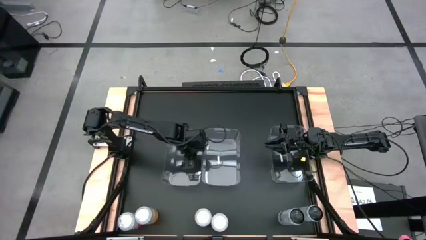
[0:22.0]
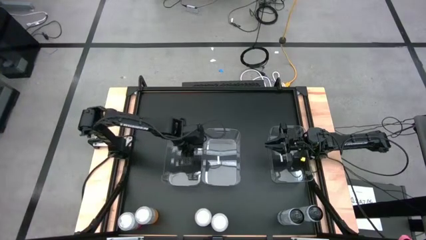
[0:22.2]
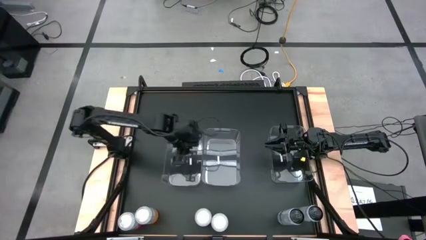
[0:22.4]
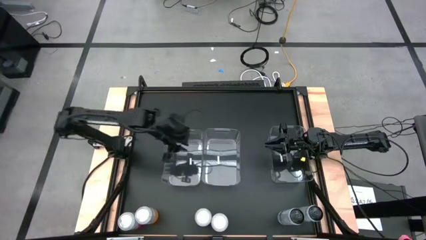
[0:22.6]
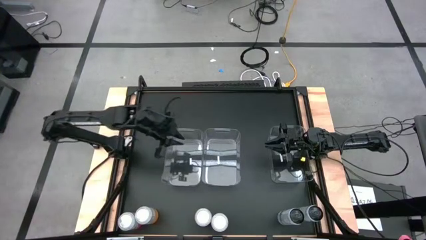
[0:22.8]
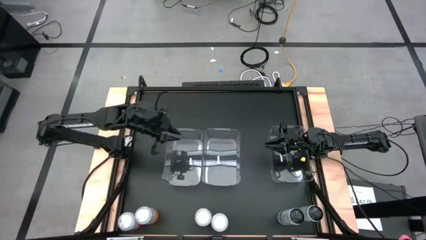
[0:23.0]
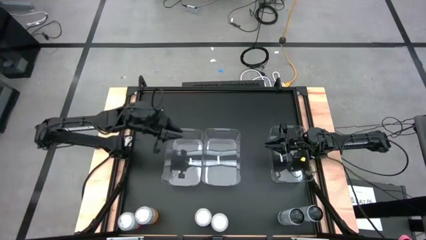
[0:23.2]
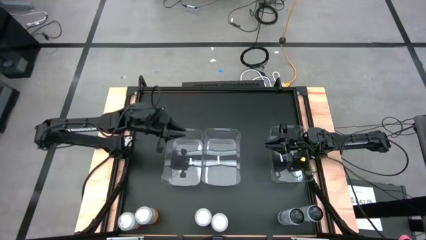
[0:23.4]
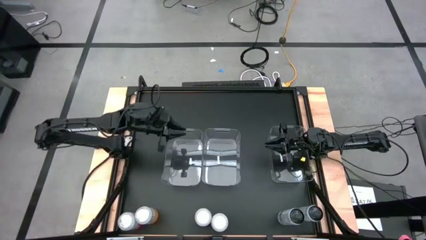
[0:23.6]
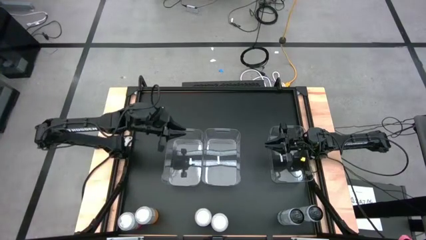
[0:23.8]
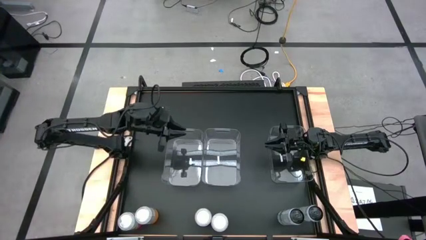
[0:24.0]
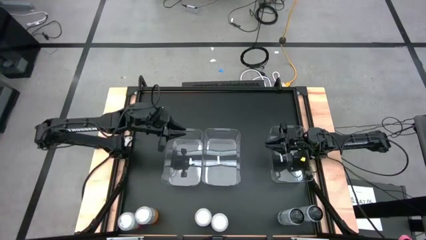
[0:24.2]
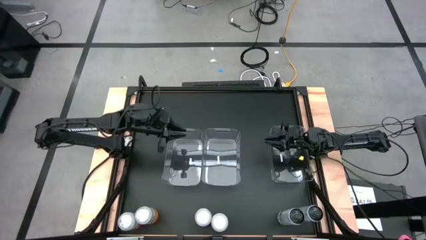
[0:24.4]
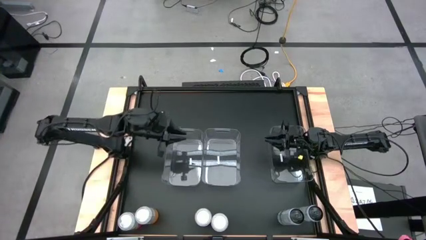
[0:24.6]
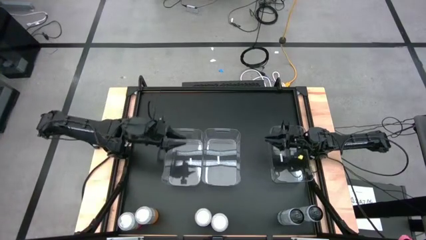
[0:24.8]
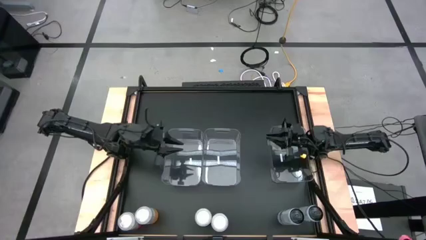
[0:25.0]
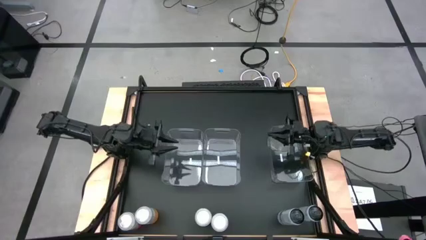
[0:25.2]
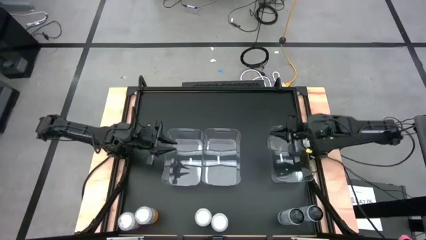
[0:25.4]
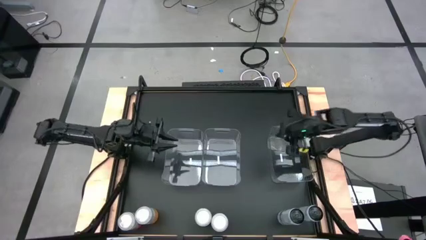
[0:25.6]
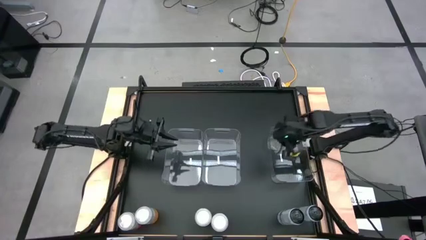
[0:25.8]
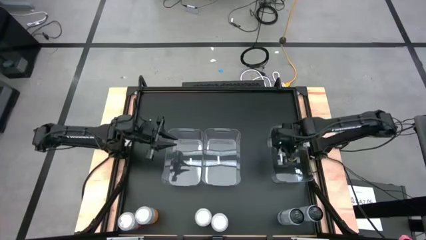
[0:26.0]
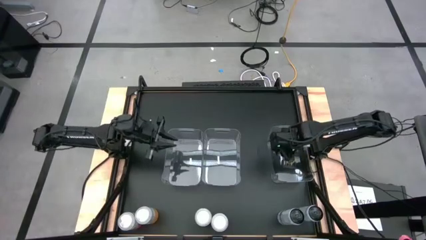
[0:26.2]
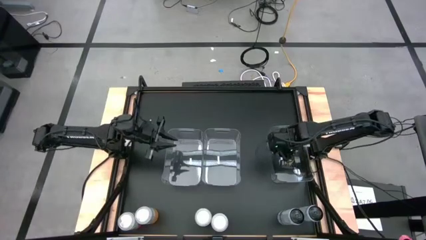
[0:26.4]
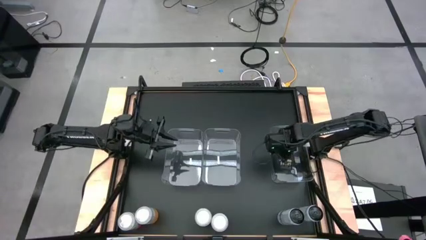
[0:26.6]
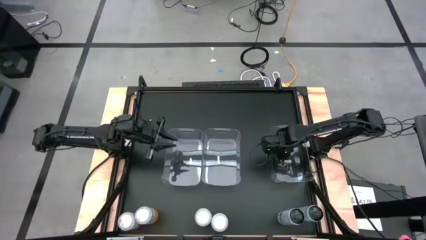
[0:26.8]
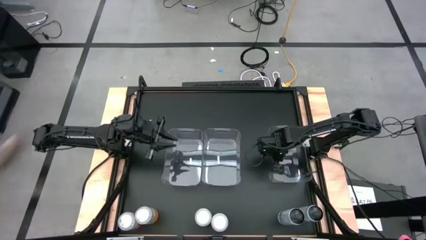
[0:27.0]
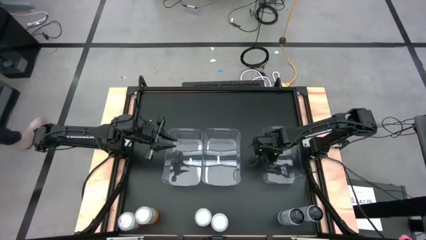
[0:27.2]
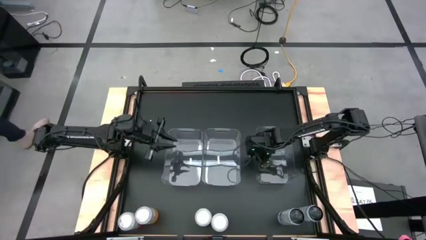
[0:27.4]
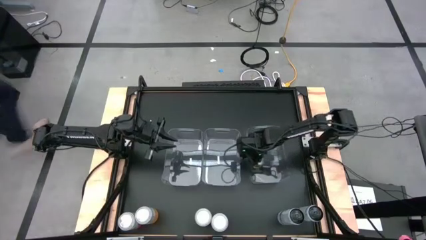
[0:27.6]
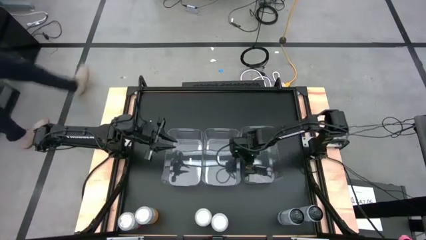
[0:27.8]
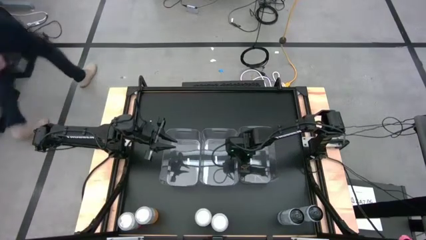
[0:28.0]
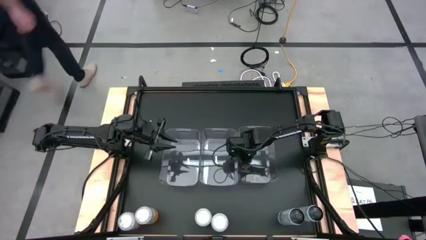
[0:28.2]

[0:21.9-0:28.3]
Task: Sort soda cans
Move the right transparent bin to the center of the table

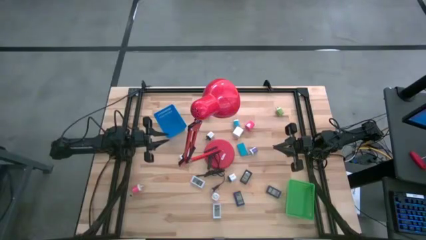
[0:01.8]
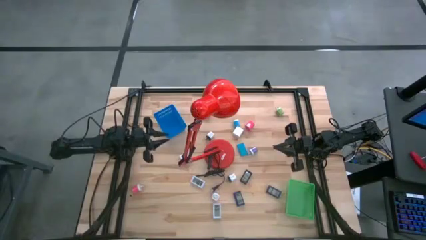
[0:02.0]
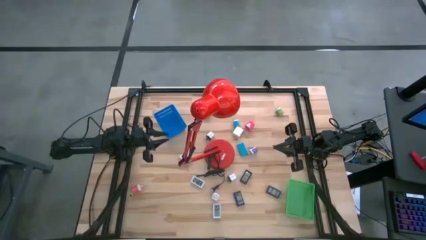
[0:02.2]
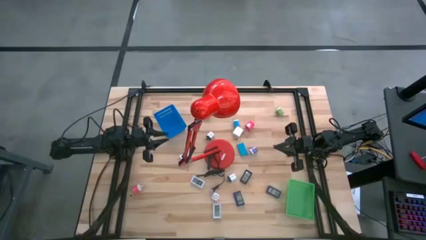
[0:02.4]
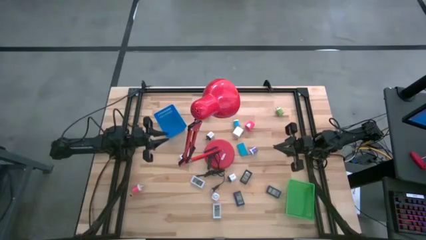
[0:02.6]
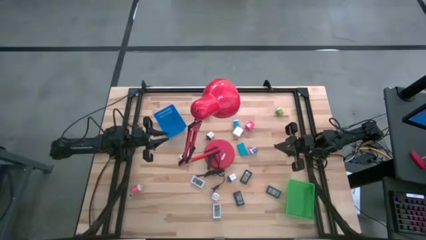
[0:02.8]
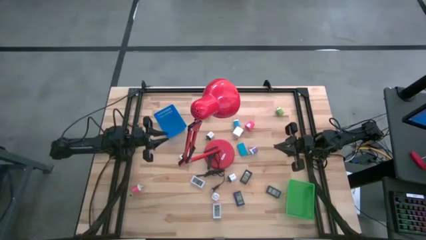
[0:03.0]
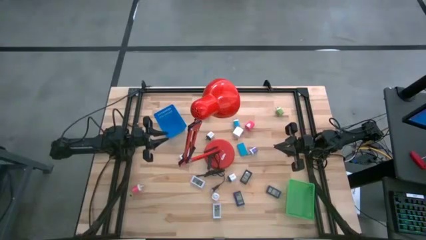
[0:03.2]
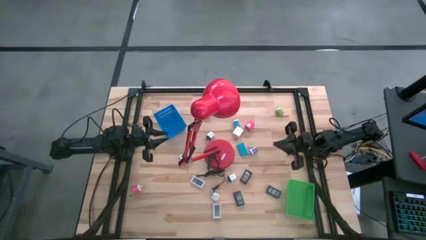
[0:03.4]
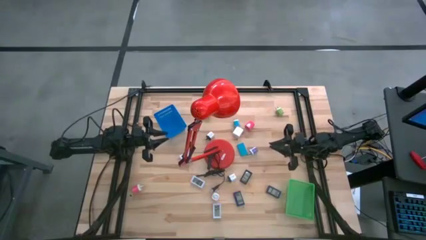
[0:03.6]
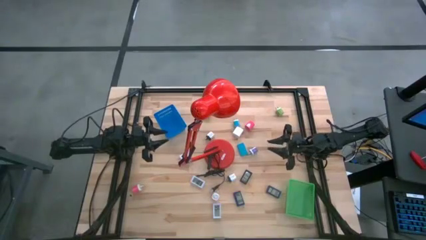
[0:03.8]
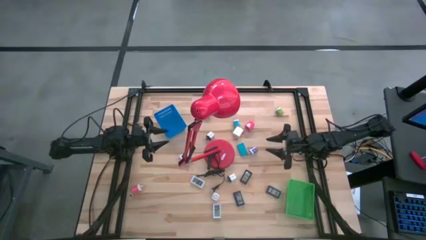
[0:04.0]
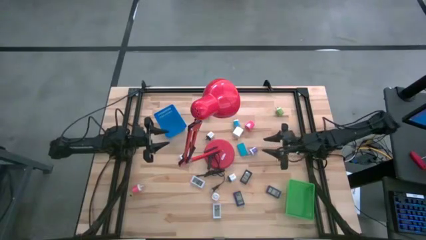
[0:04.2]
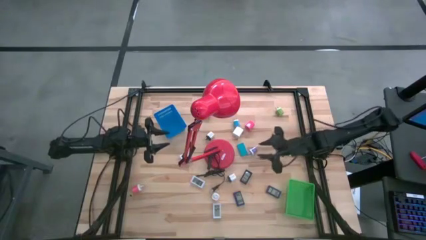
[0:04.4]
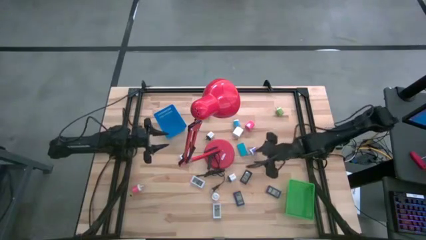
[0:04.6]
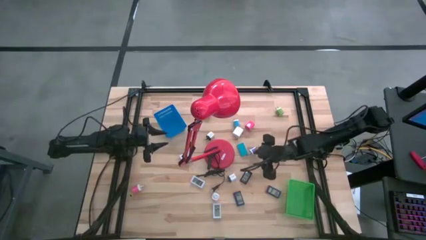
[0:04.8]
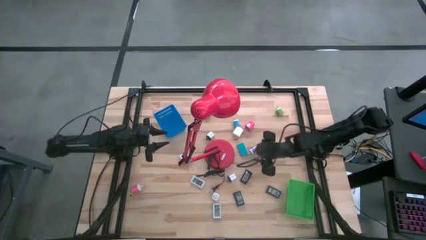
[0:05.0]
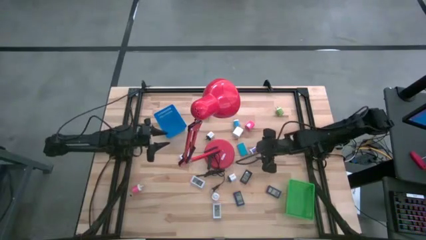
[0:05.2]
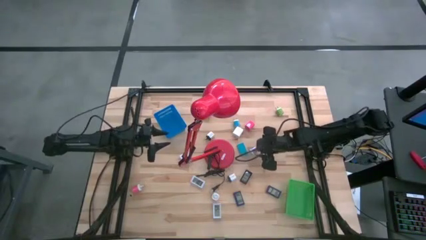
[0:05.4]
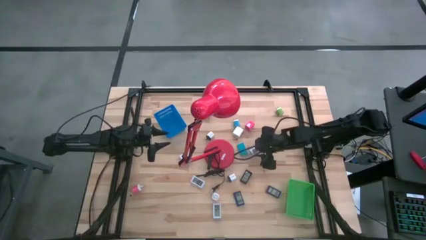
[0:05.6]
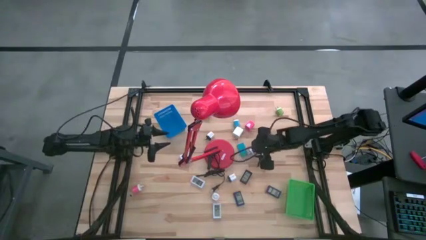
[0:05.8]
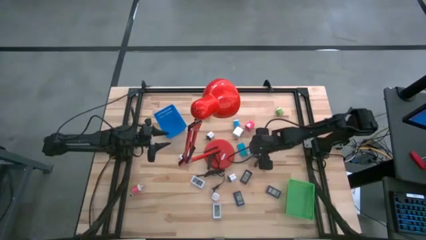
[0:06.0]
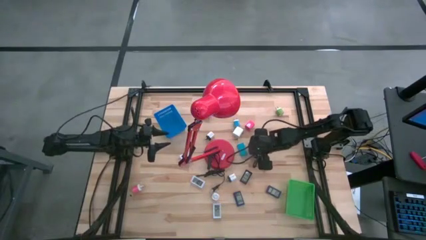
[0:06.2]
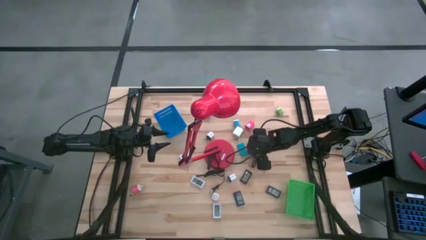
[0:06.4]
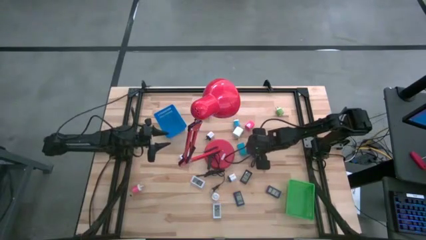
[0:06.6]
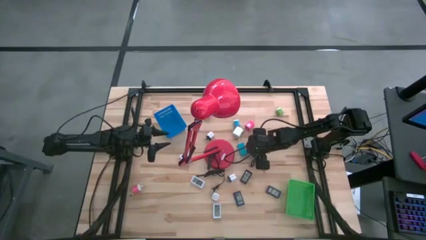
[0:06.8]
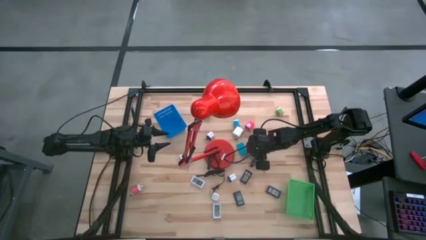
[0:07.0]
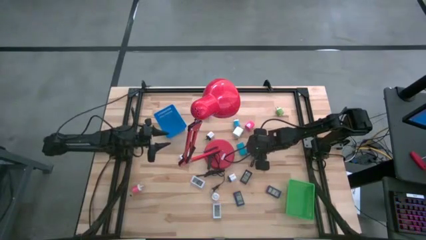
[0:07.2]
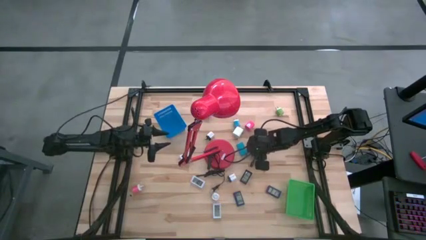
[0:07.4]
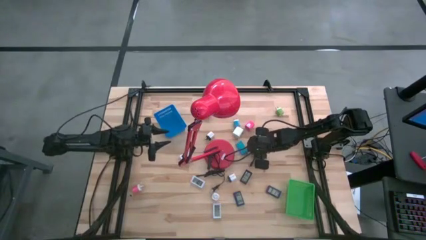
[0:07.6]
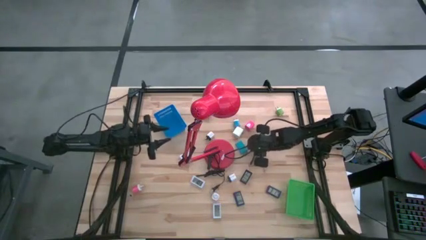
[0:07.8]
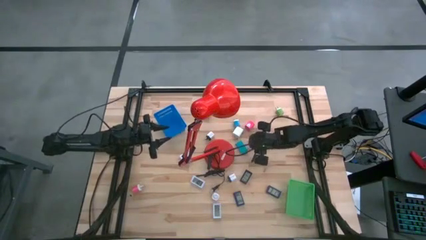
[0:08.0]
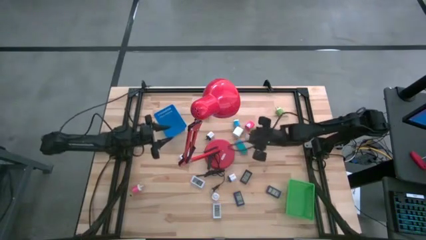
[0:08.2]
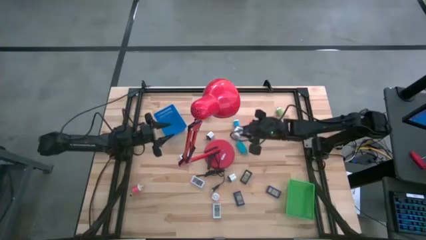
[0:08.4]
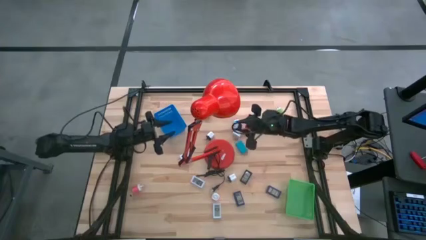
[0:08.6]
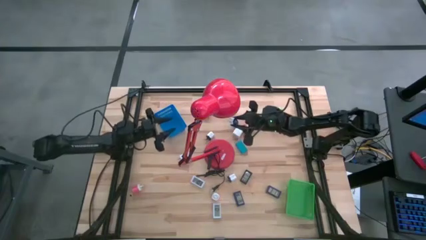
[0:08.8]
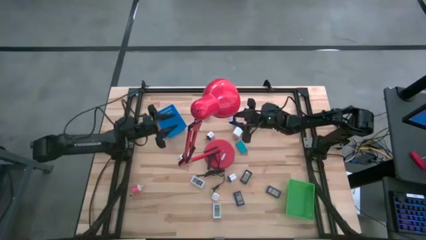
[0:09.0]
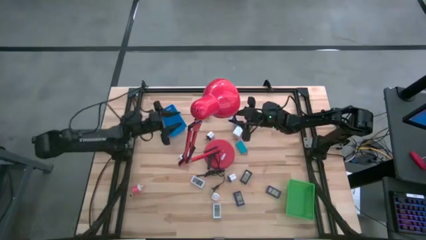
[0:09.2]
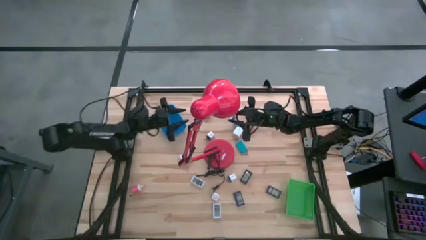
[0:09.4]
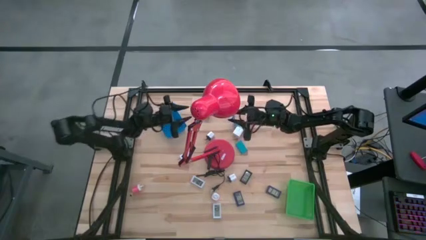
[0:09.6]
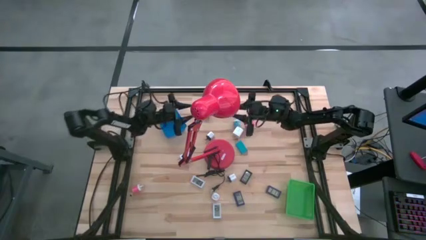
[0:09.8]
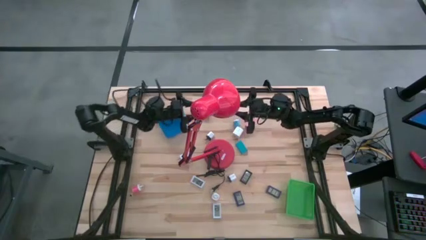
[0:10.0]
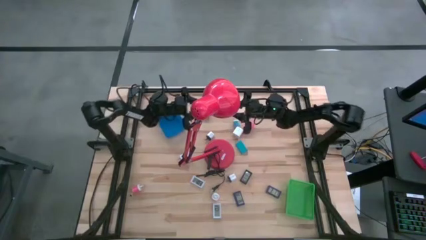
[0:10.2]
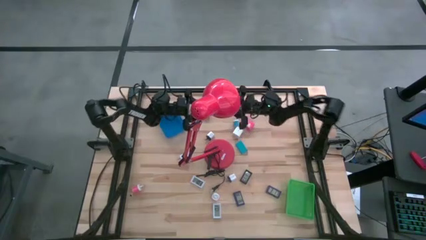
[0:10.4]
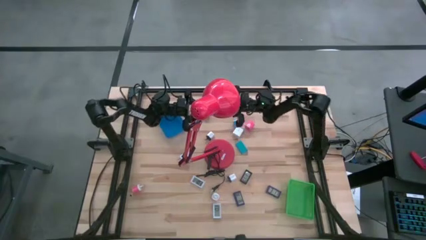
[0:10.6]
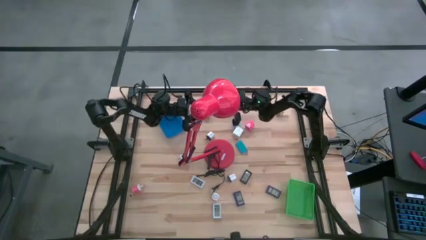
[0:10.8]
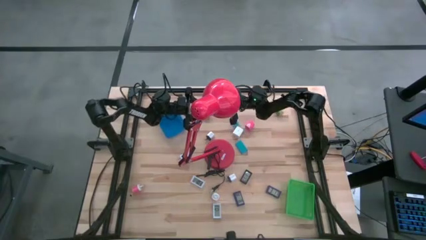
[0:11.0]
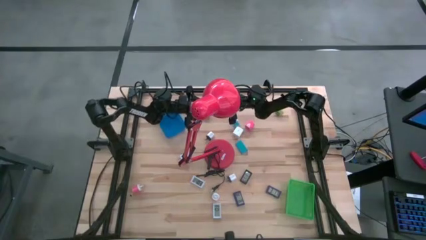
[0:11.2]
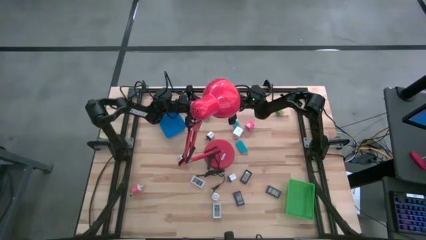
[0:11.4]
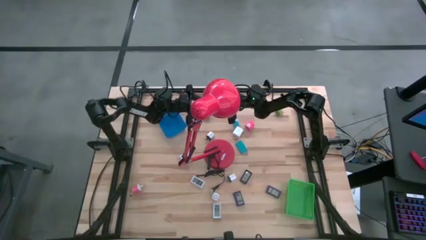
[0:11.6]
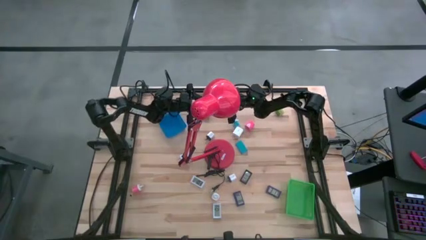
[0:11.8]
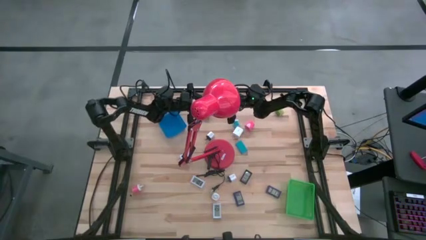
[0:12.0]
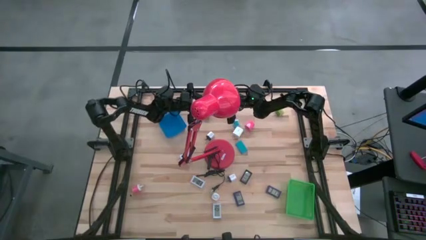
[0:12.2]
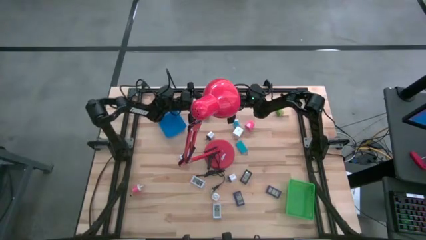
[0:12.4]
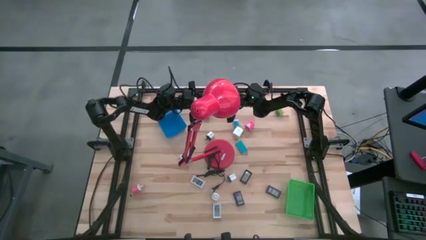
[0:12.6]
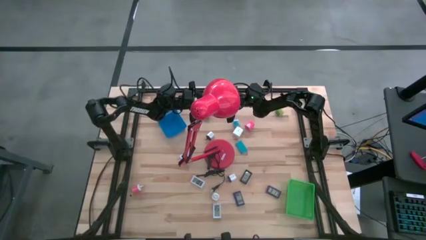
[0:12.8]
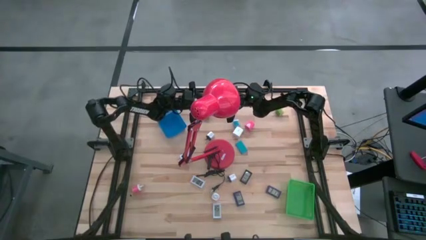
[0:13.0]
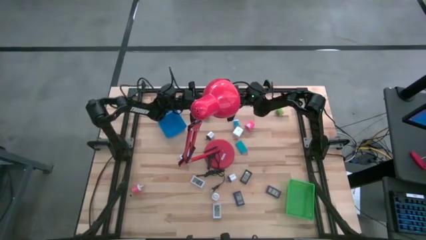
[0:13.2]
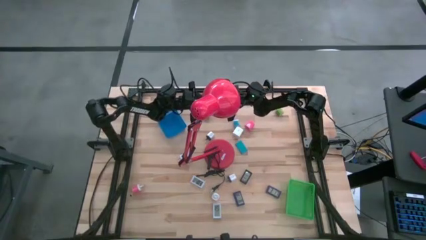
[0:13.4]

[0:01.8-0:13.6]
Task: Pick & Place Office items
Put the purple charger adapter into the blue bin
